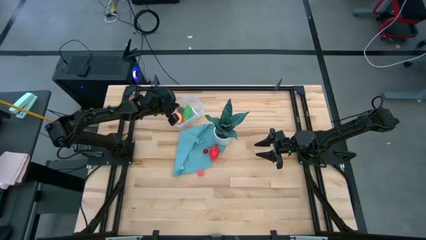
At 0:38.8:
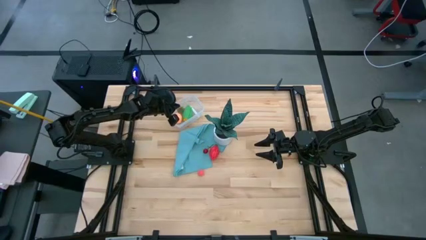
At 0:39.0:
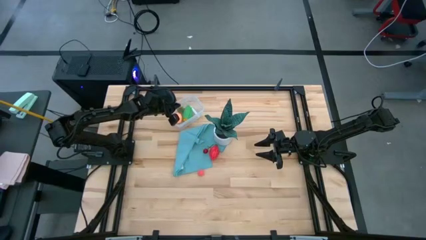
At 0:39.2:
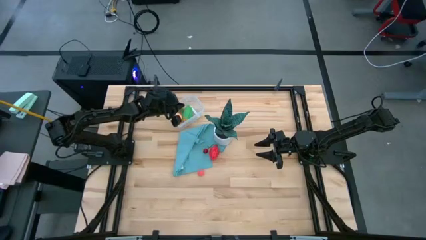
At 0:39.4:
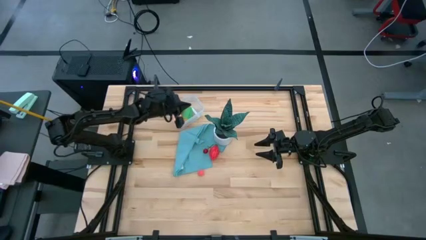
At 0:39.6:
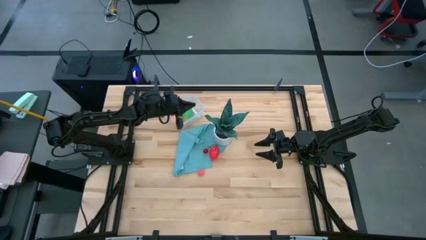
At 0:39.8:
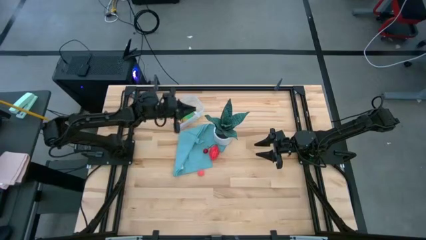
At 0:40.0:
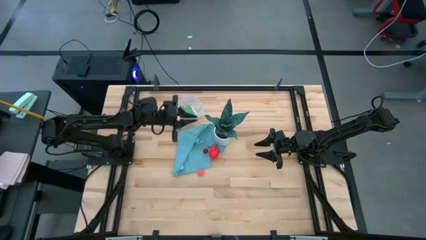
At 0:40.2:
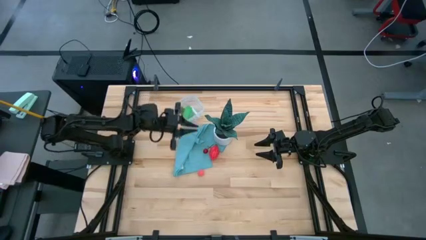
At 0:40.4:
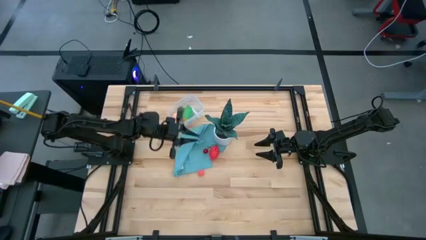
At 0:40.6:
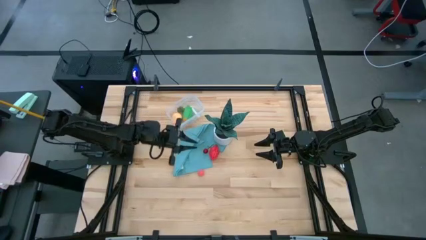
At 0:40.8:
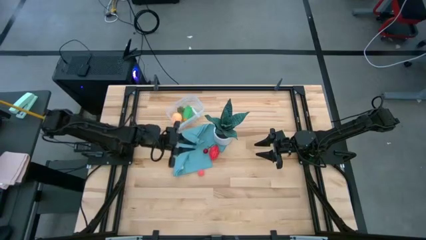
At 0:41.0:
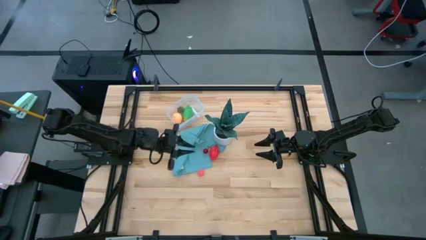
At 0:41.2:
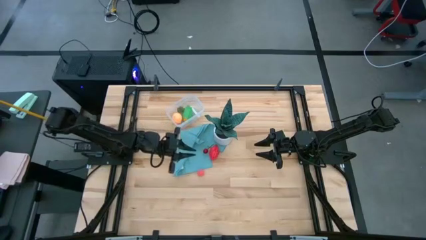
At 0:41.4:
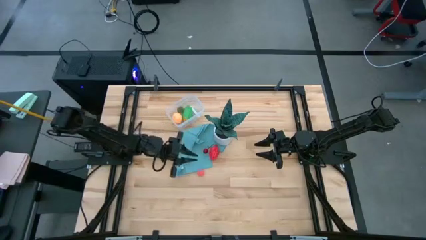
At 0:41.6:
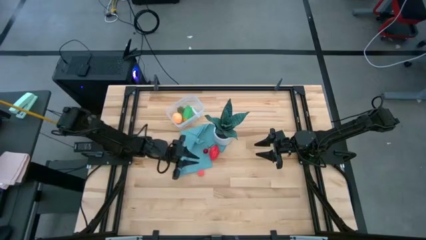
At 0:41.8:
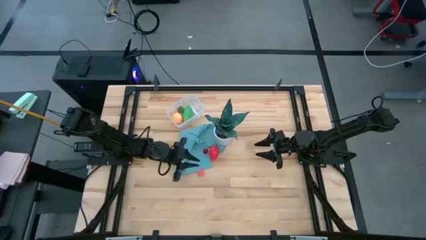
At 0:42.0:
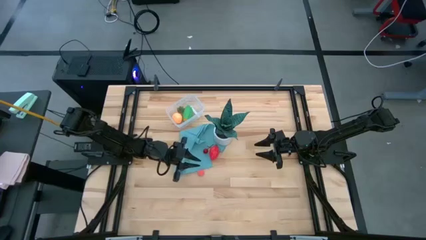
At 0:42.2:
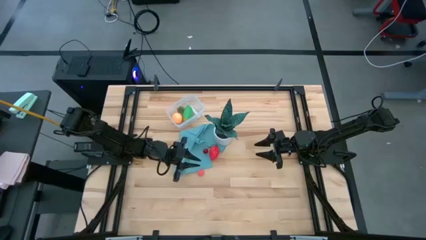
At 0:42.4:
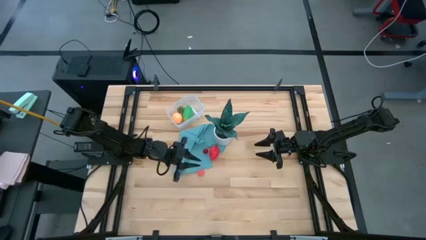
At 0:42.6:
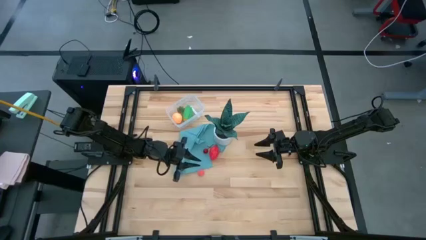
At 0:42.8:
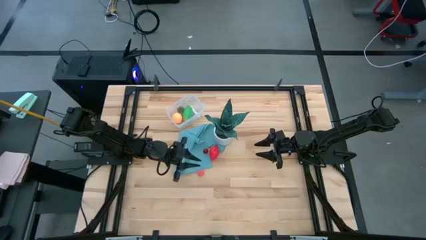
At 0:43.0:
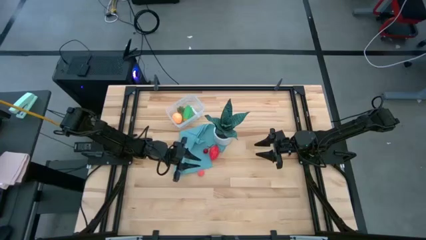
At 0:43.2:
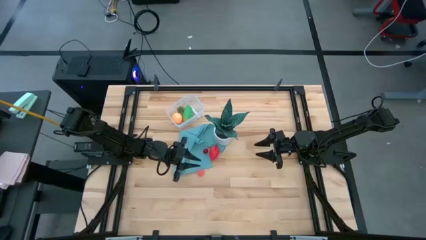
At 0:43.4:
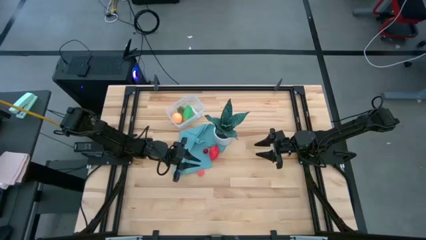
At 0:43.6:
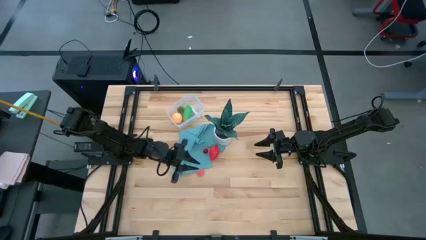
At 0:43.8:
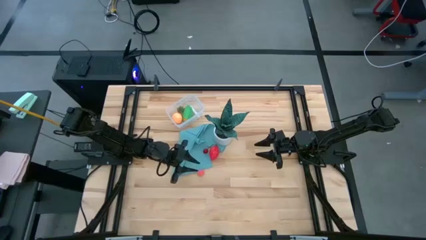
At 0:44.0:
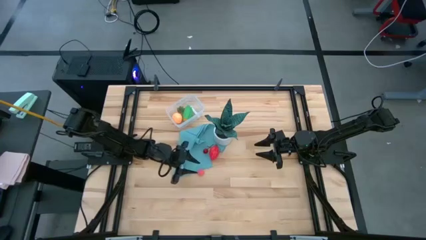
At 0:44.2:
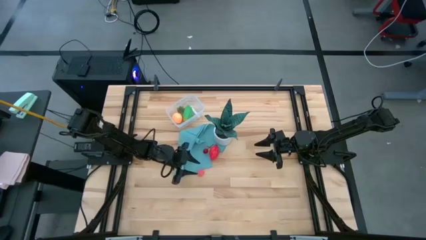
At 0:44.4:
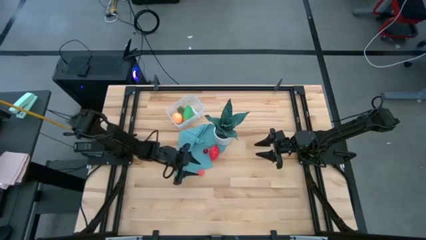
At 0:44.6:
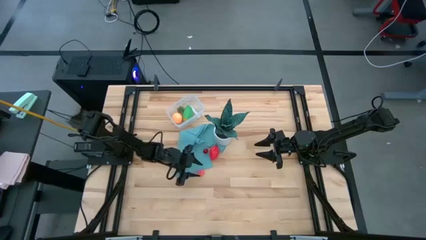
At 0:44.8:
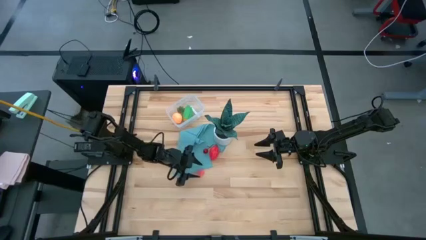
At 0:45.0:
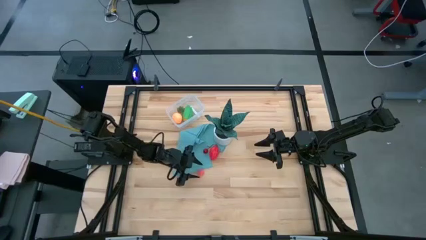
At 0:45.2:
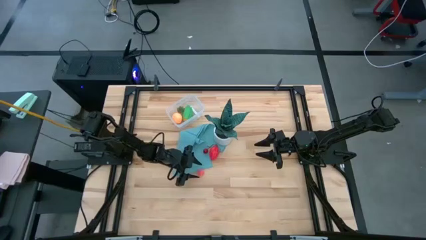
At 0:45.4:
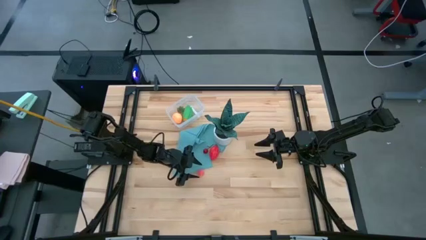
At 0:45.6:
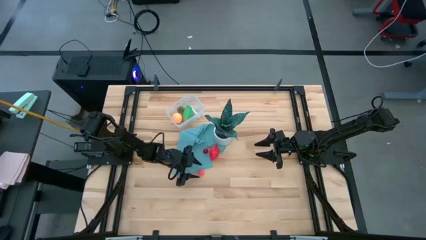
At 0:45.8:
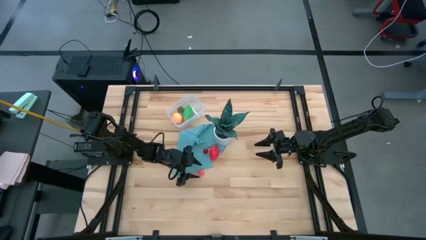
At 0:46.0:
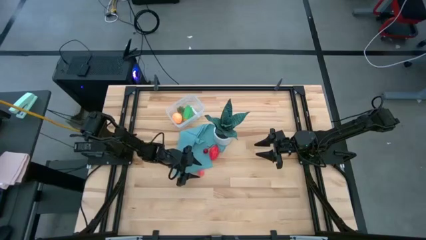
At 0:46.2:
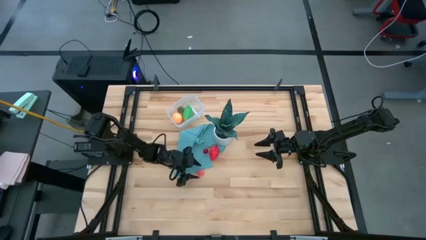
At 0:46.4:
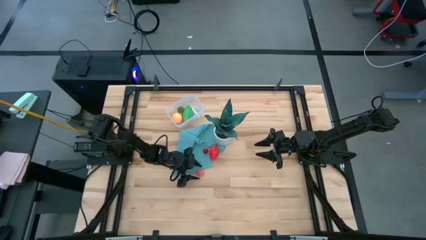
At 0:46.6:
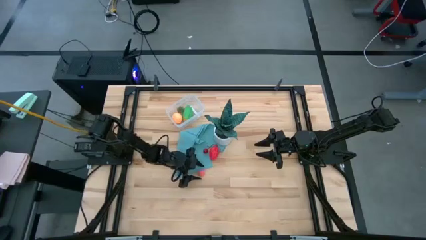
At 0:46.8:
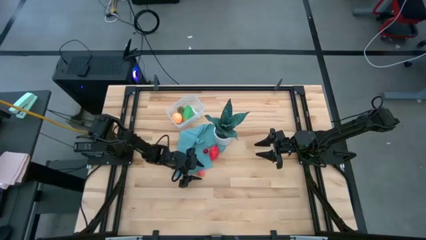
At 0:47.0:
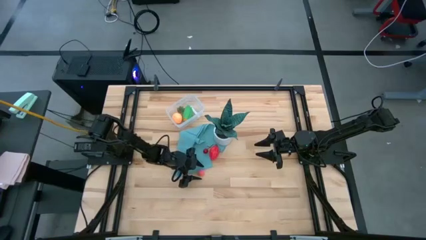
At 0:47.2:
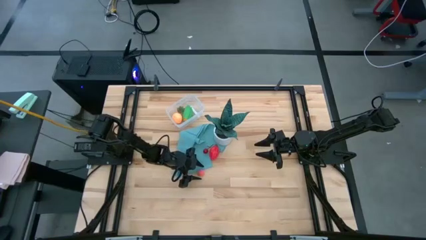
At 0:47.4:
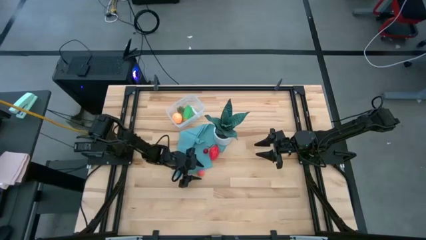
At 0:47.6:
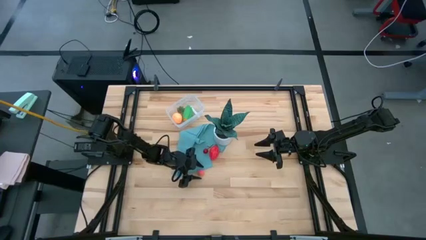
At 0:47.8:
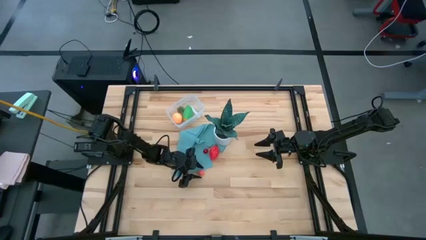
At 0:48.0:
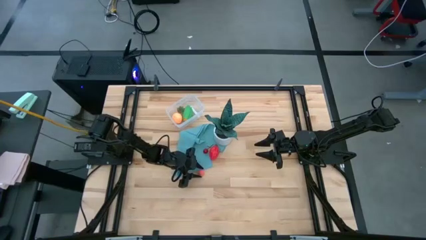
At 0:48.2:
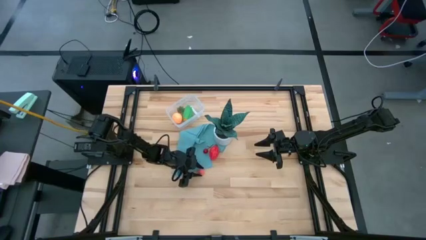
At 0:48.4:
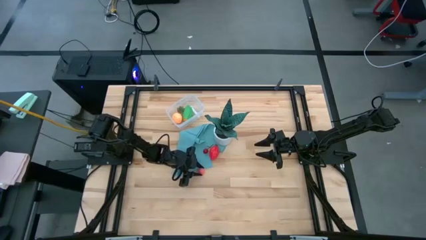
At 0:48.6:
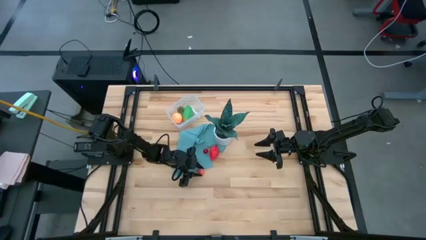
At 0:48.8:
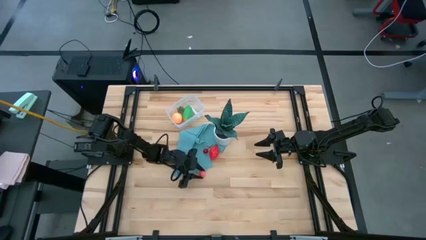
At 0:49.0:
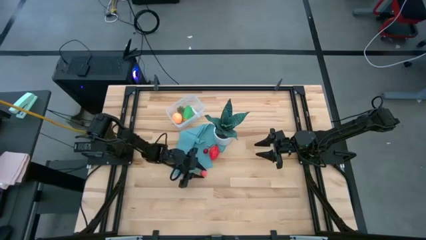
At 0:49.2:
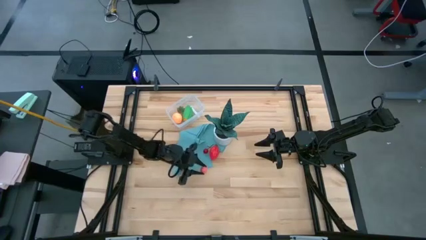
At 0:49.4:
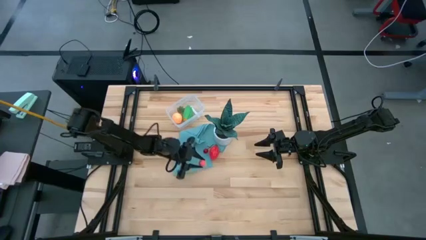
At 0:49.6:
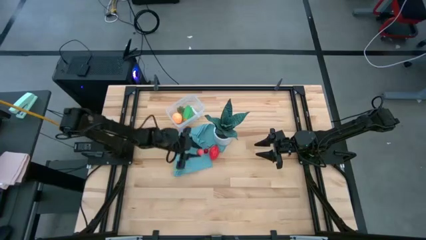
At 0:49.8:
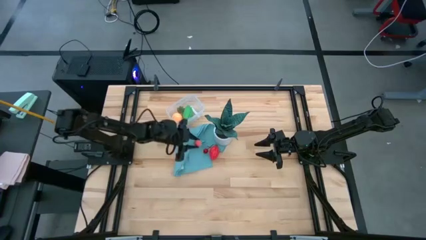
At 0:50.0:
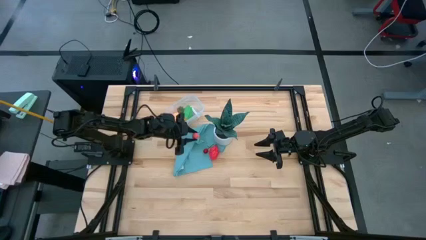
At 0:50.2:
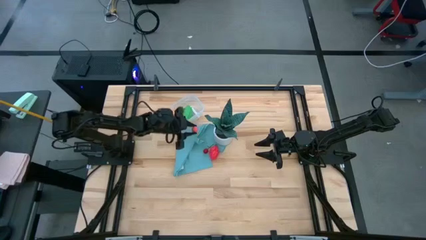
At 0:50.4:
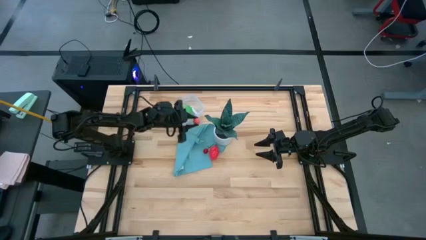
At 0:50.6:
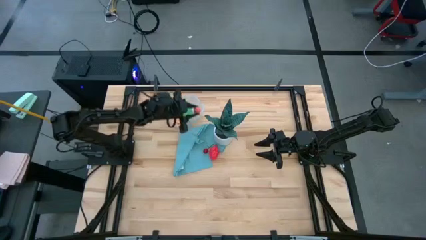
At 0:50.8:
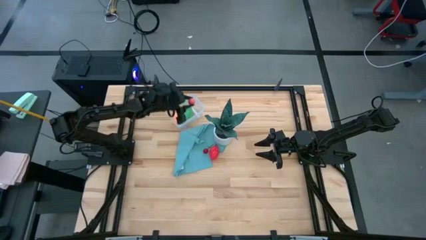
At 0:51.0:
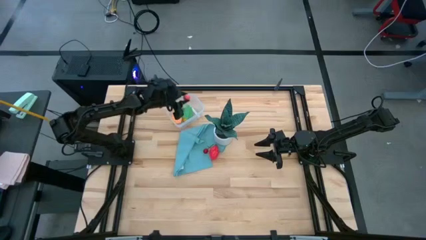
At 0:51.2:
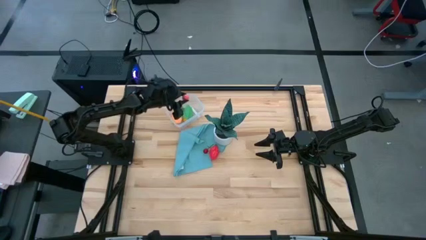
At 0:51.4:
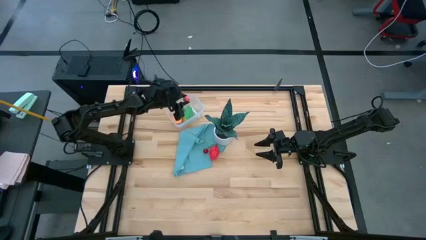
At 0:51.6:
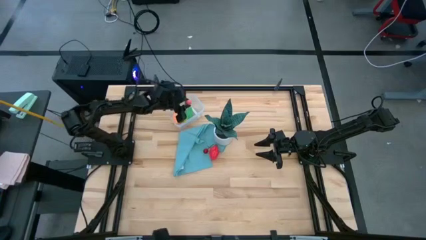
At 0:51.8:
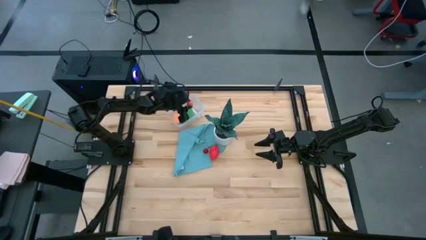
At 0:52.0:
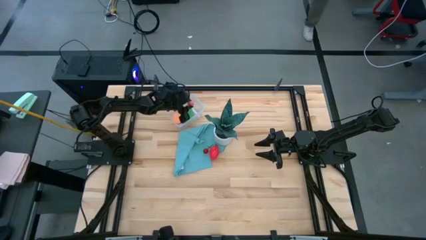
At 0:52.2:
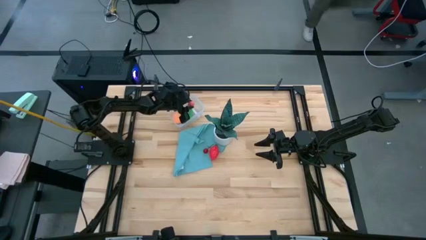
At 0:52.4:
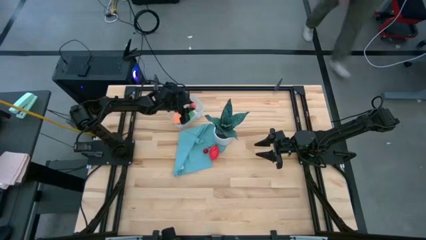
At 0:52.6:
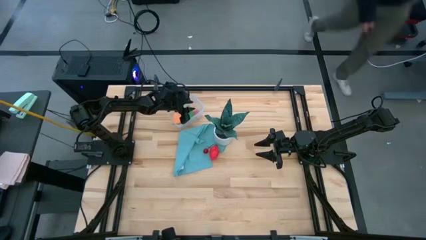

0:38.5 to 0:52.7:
Task: Pick and placing Produce into tupperware
Put the peach into the transparent bin
